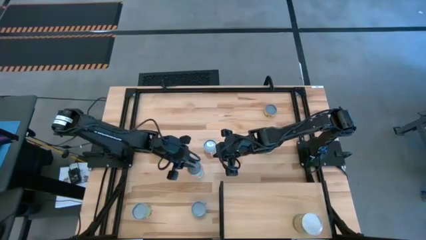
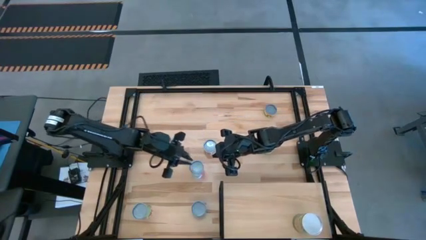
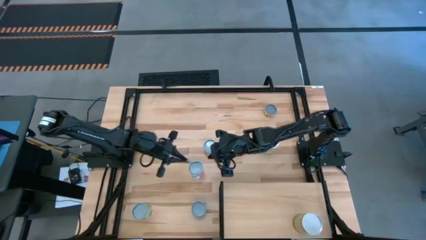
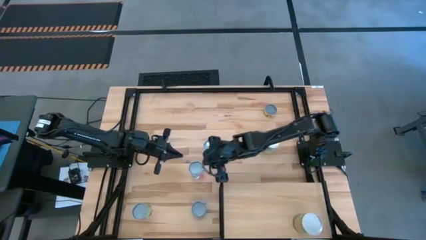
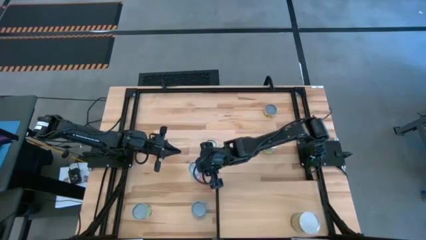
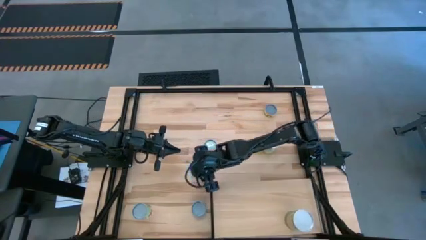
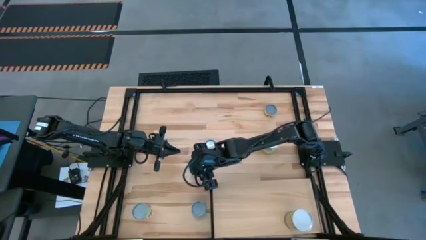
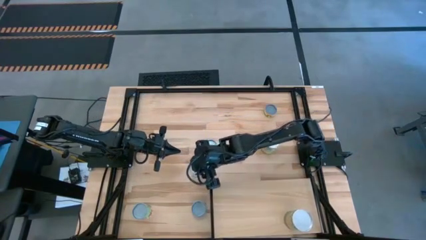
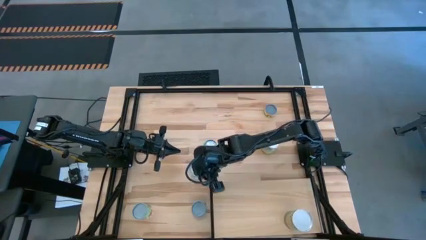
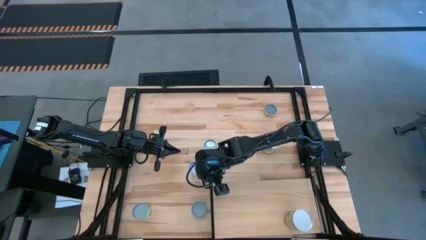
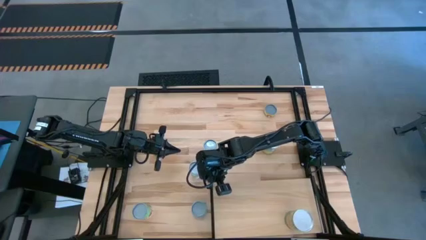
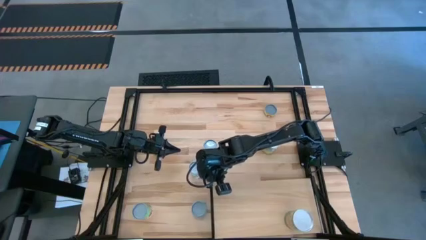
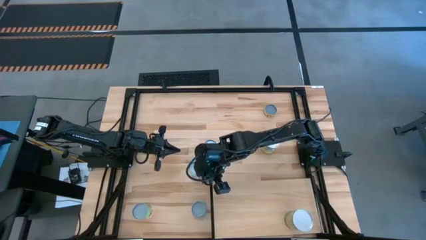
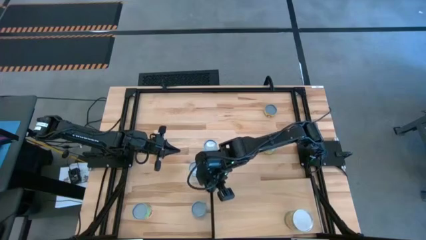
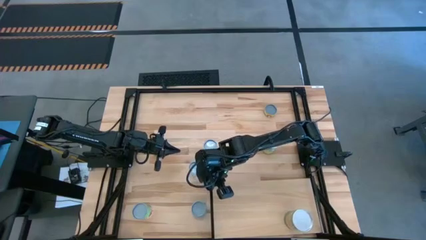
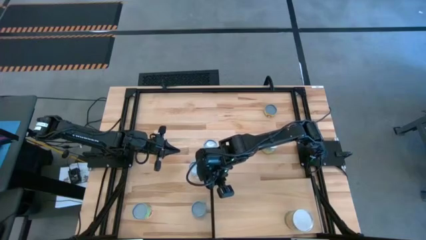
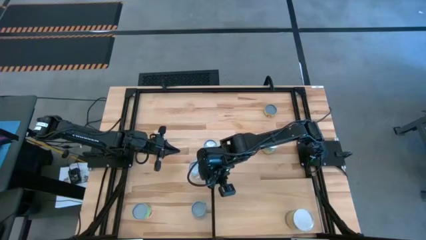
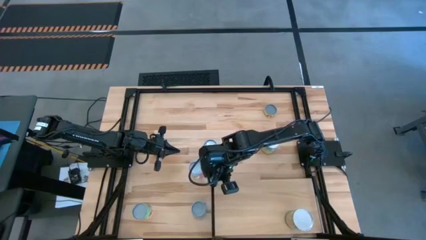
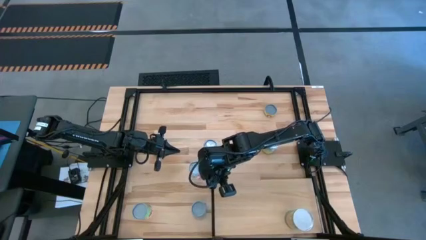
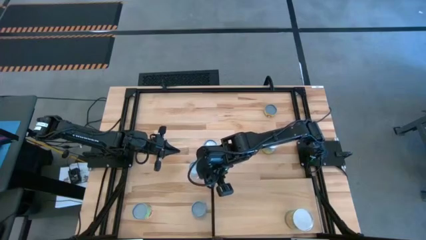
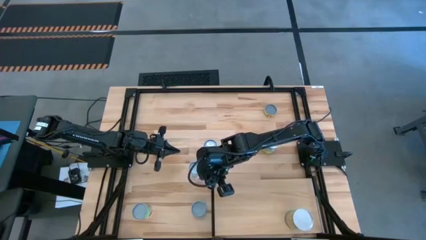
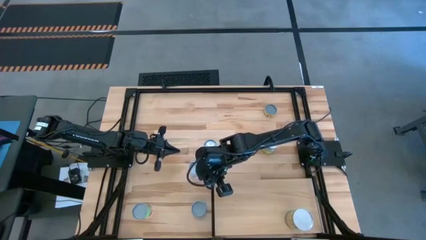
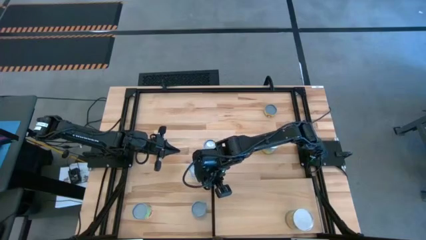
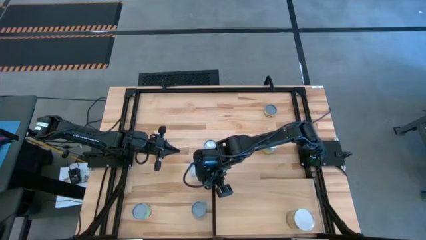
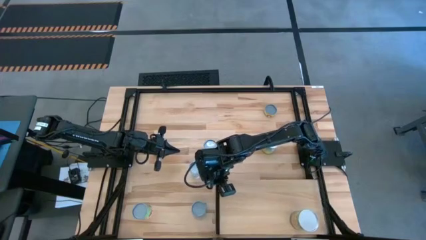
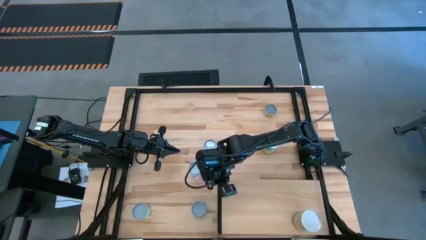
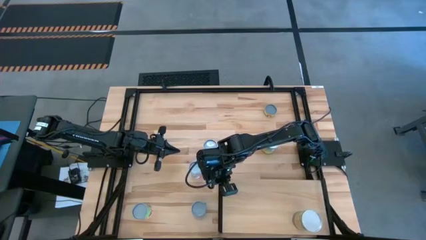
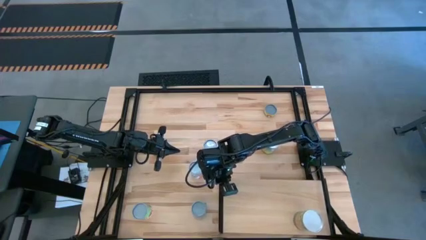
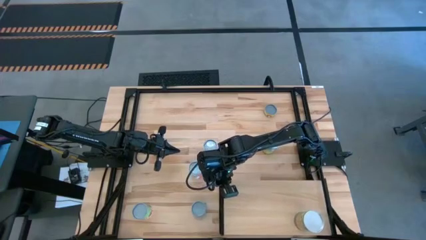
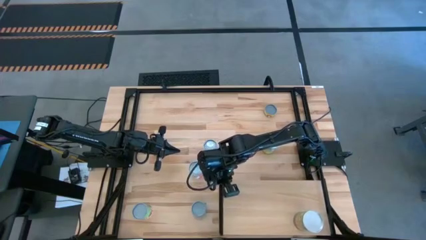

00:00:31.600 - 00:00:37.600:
Task: Pick and place cans onto a shelf
Adjust the shelf

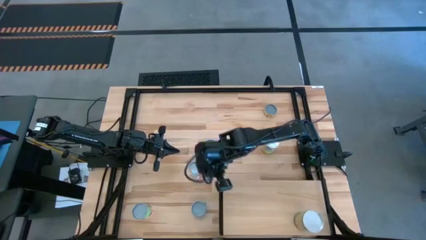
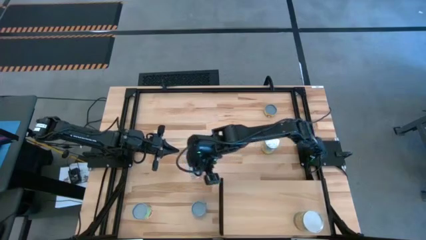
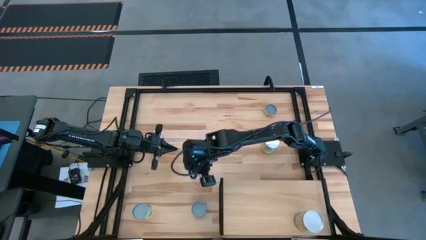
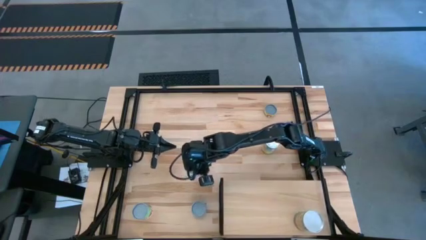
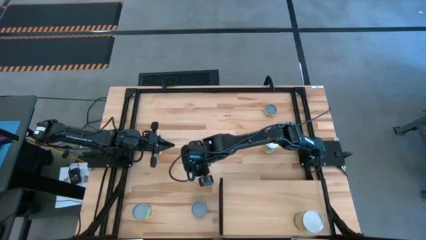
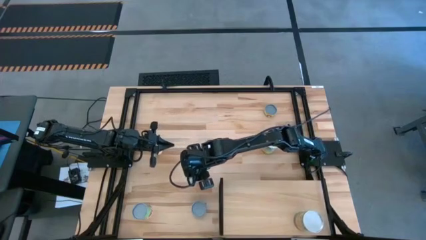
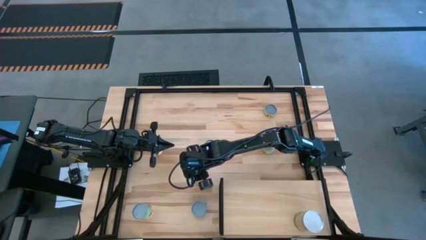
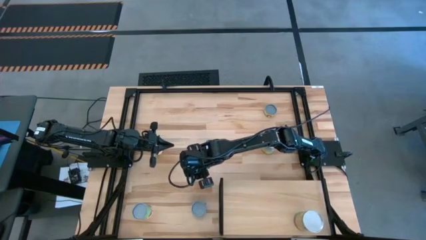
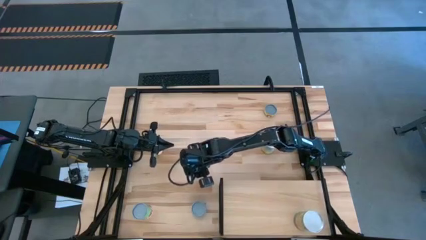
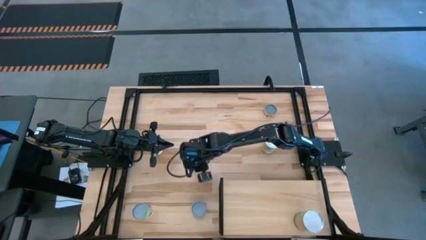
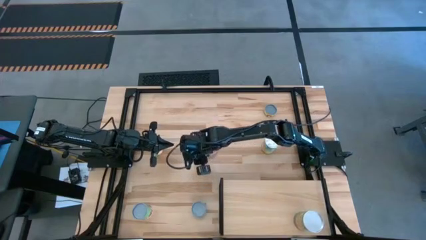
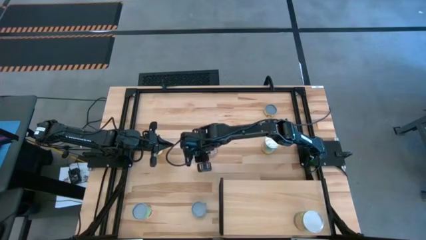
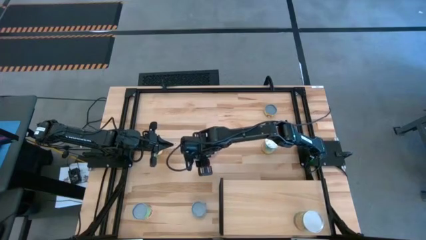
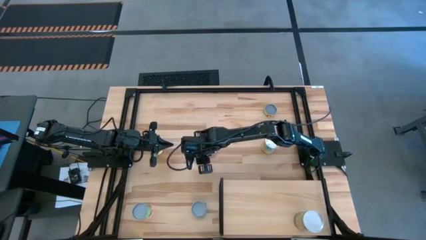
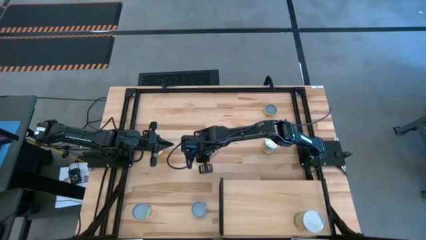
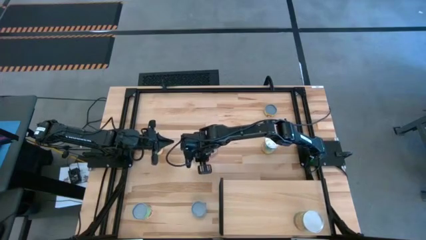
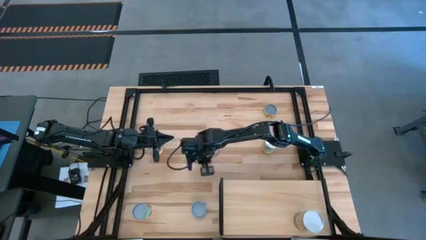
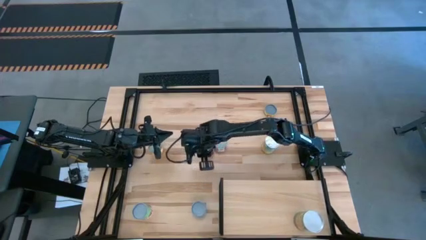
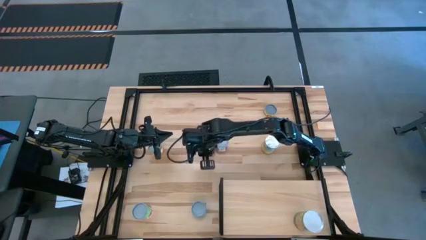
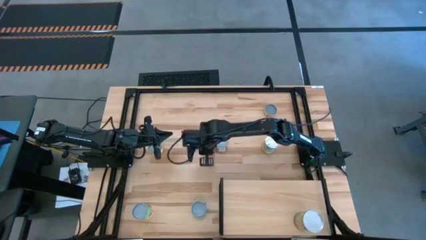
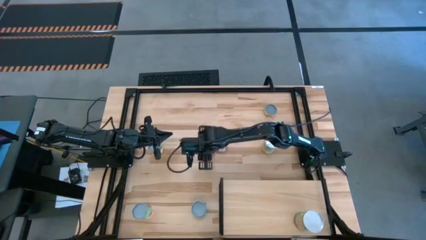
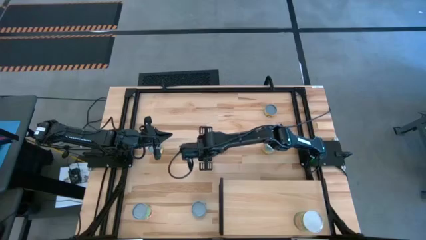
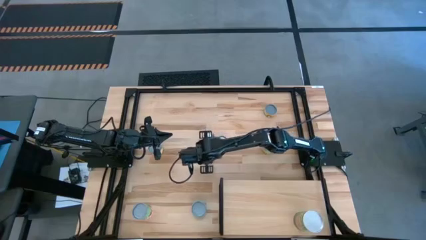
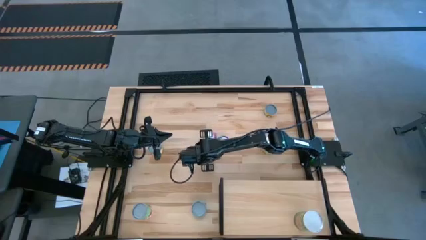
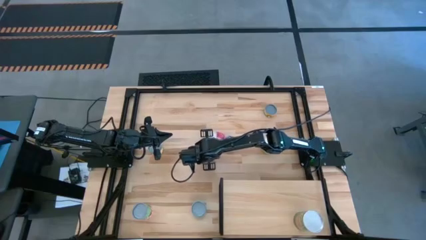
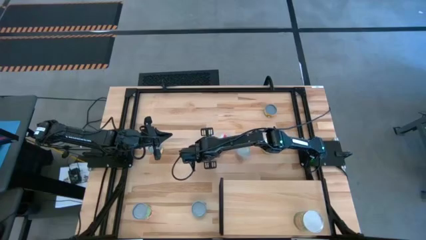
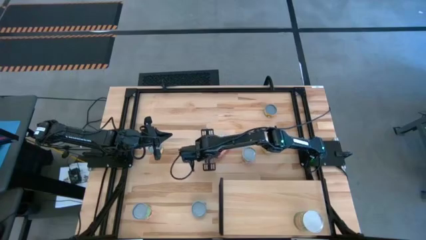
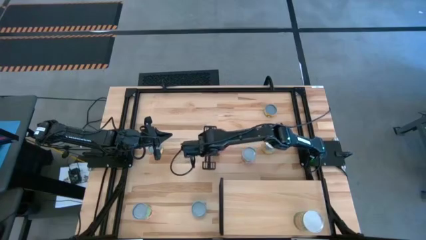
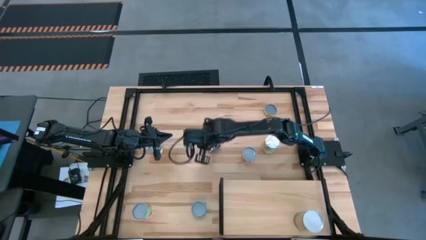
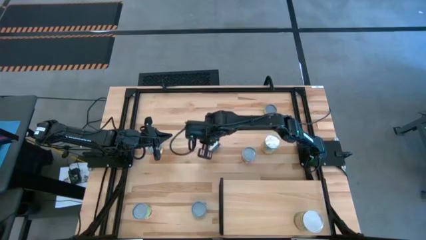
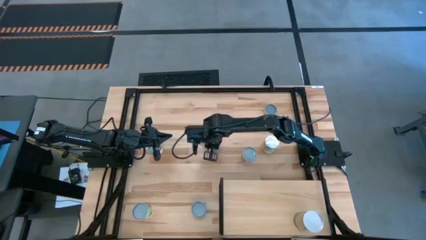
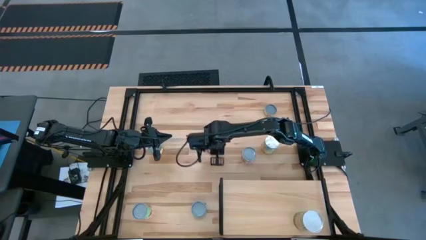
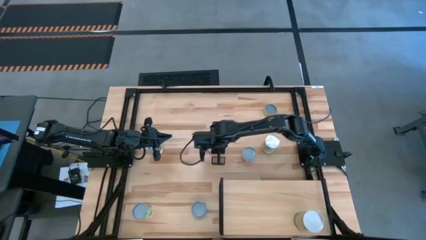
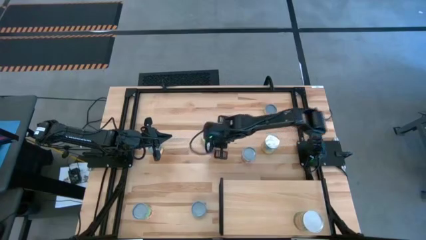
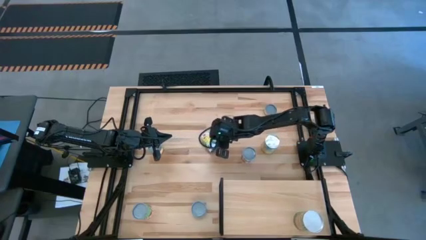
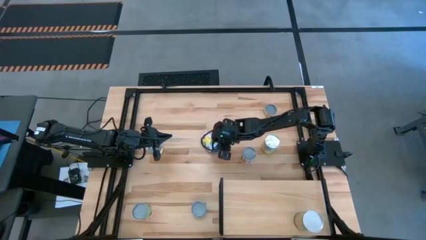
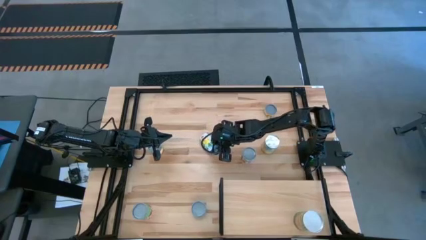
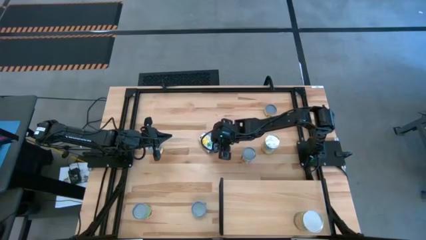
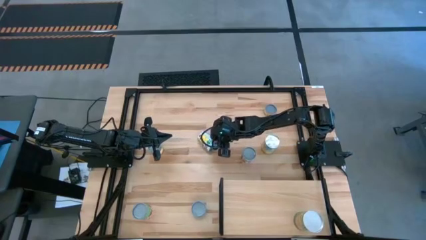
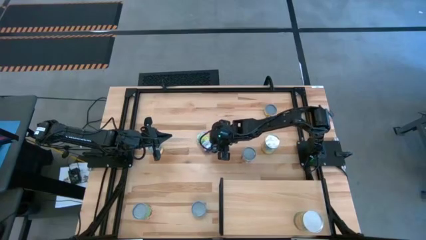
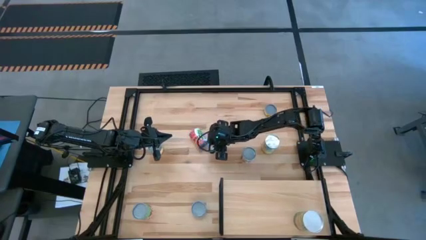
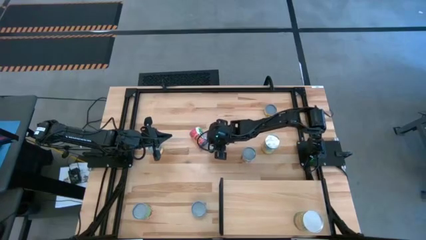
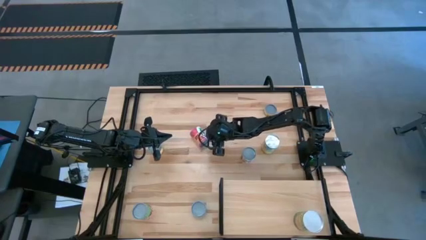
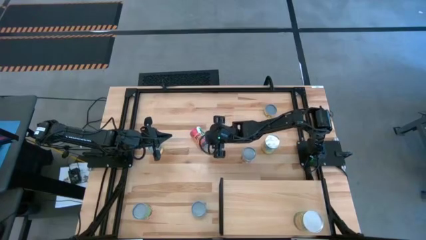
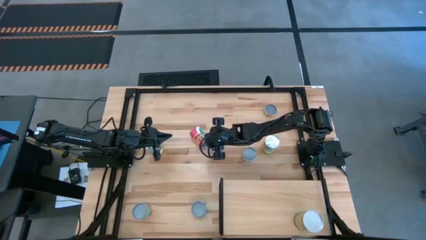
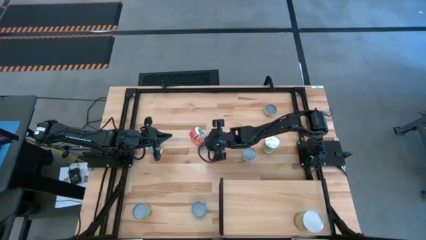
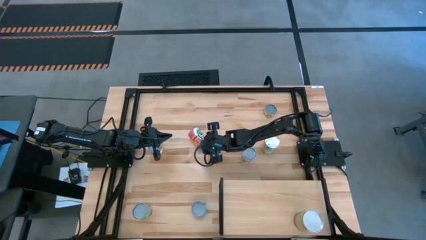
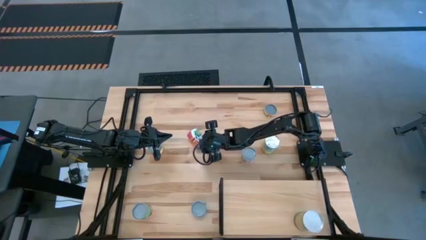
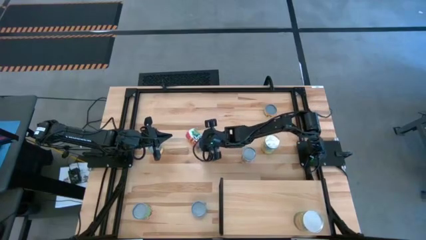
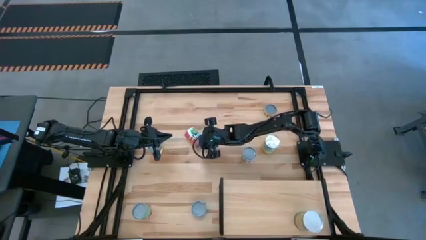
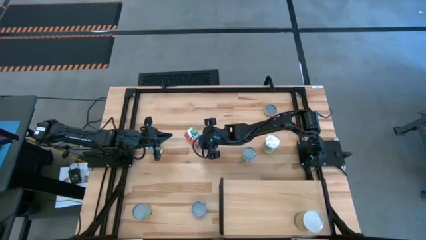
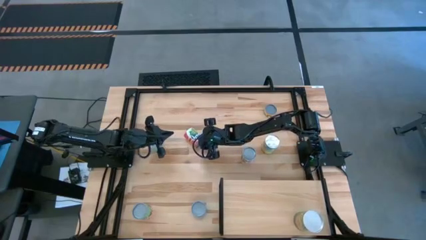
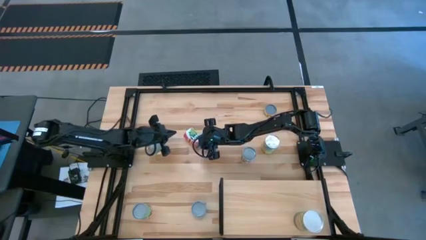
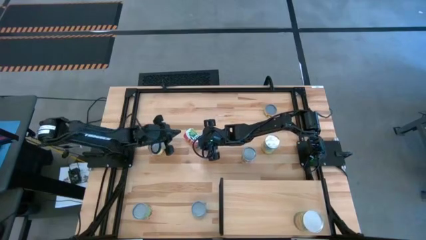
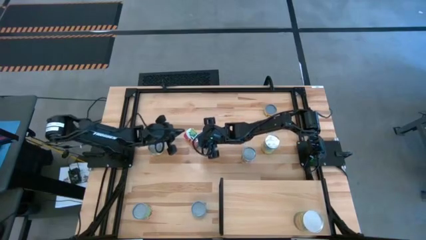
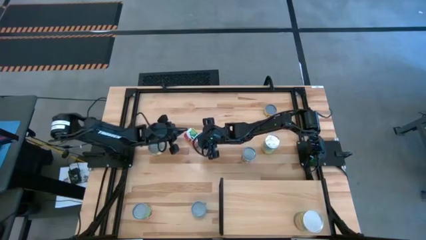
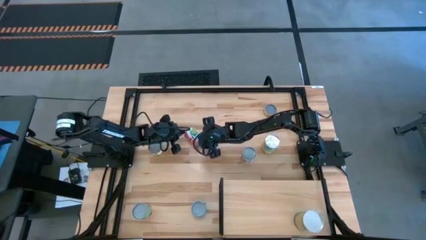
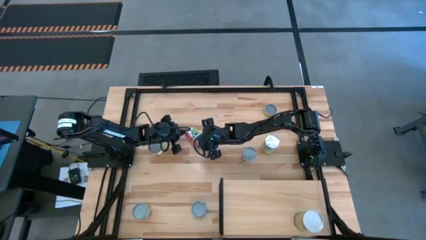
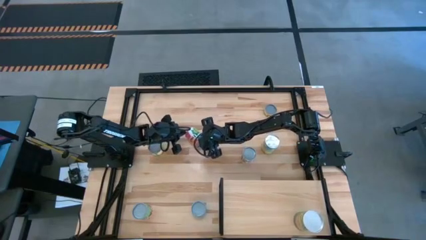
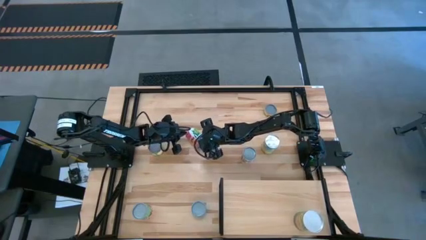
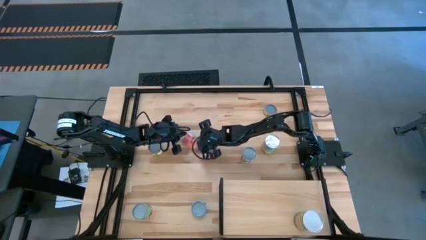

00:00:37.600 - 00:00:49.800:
Put the canned mixed fruit on the shelf
